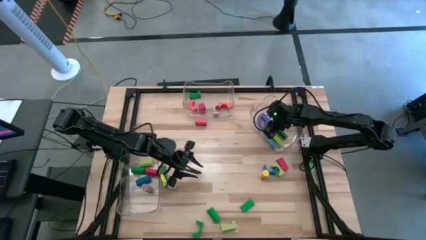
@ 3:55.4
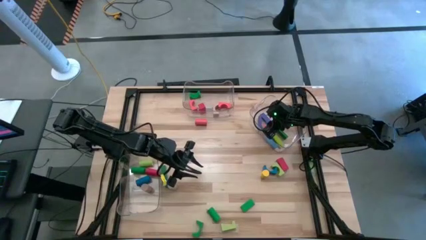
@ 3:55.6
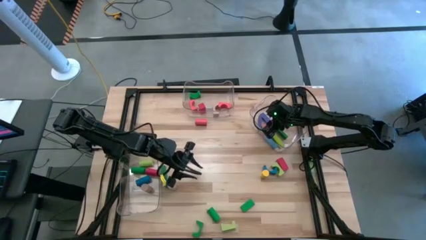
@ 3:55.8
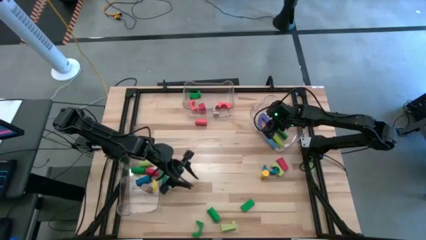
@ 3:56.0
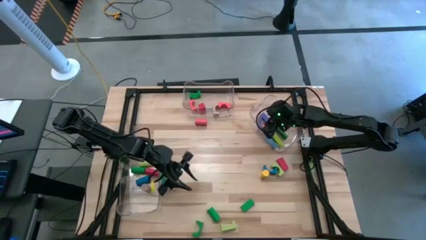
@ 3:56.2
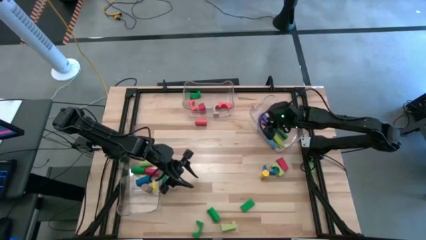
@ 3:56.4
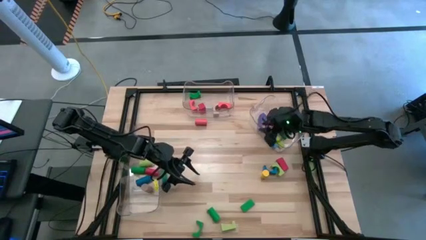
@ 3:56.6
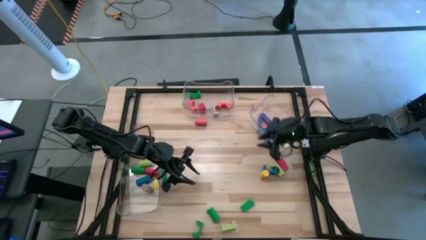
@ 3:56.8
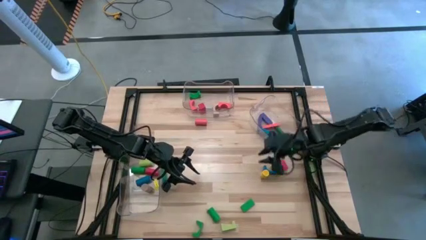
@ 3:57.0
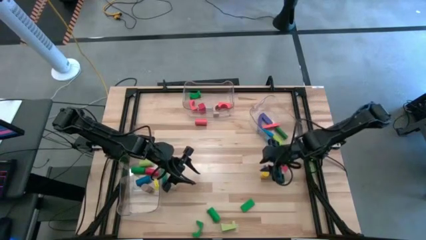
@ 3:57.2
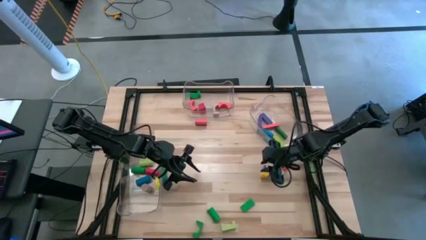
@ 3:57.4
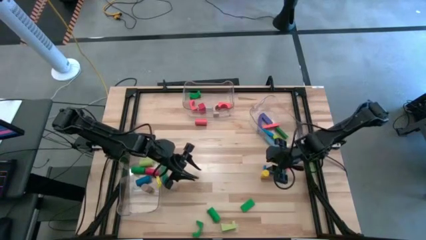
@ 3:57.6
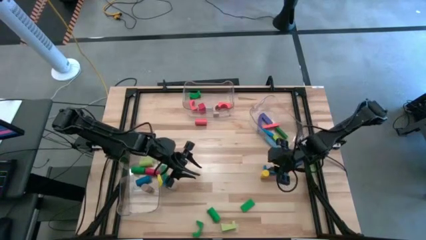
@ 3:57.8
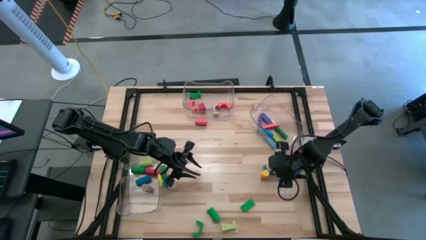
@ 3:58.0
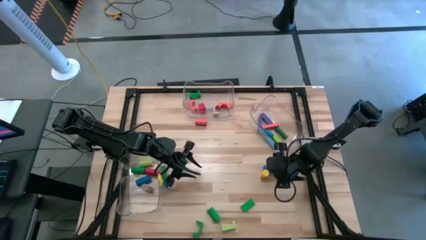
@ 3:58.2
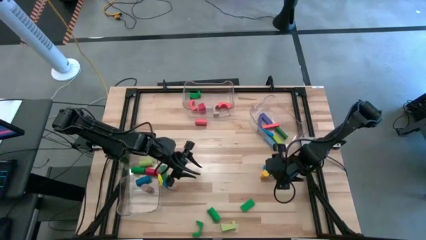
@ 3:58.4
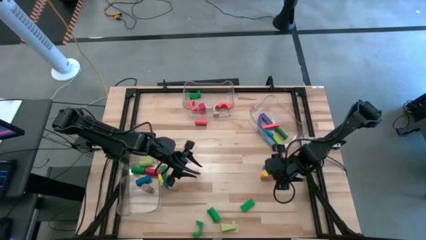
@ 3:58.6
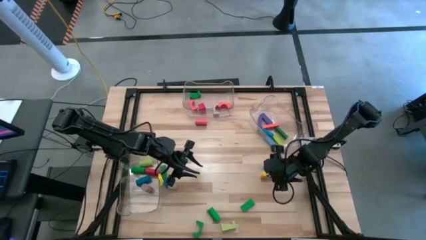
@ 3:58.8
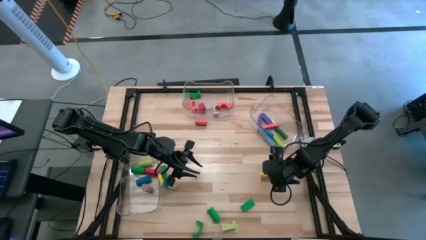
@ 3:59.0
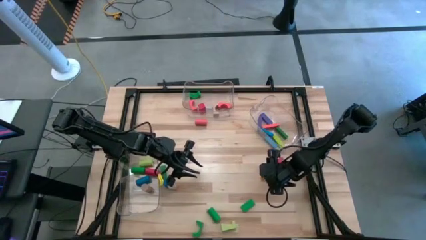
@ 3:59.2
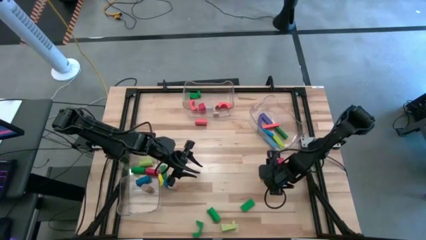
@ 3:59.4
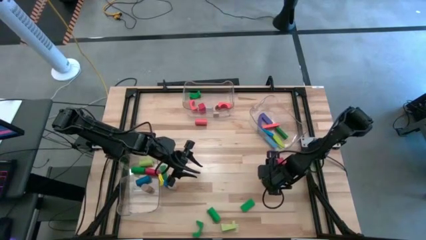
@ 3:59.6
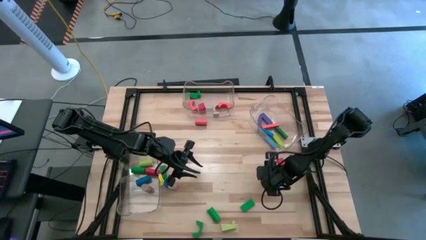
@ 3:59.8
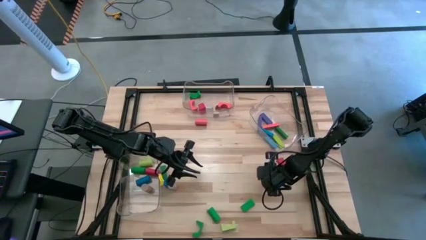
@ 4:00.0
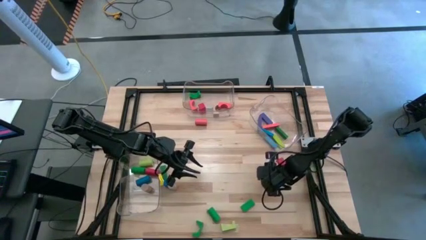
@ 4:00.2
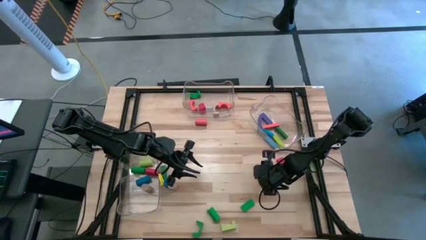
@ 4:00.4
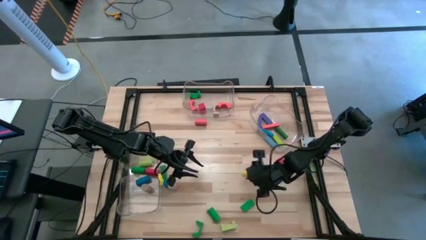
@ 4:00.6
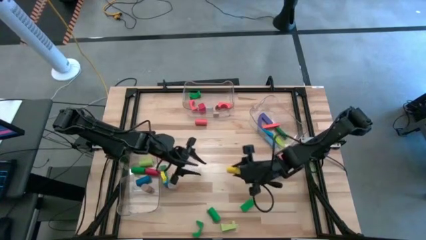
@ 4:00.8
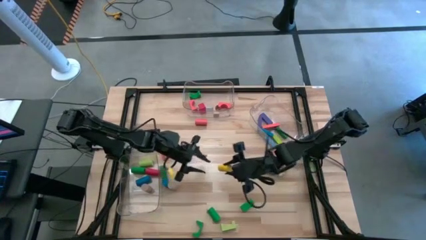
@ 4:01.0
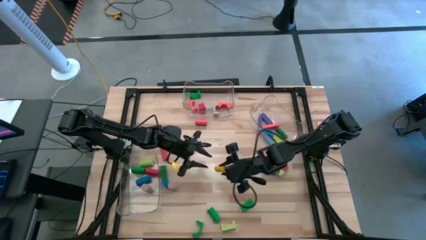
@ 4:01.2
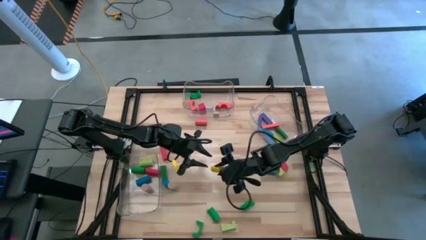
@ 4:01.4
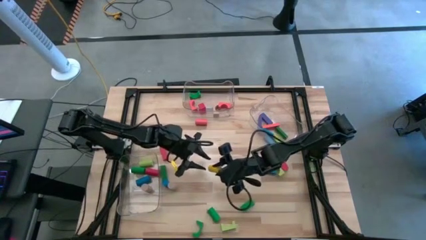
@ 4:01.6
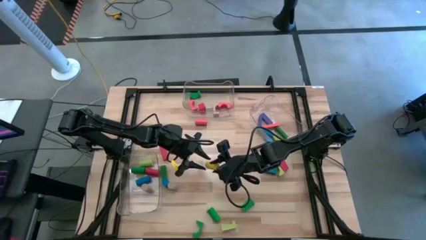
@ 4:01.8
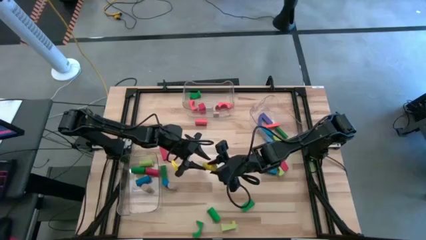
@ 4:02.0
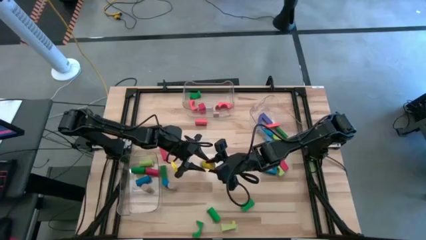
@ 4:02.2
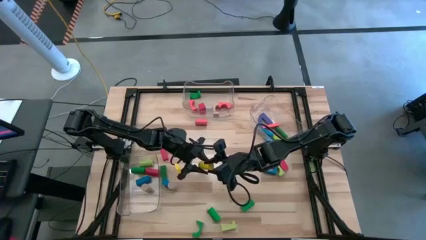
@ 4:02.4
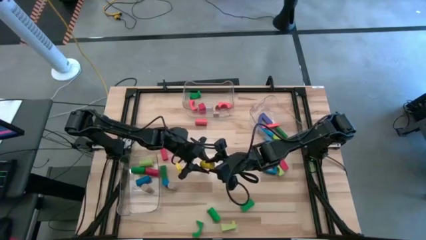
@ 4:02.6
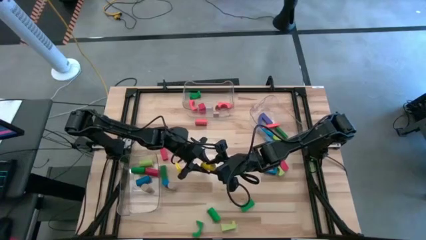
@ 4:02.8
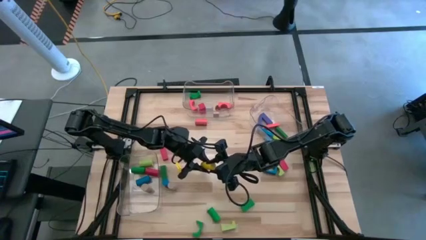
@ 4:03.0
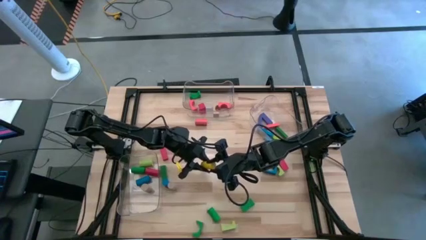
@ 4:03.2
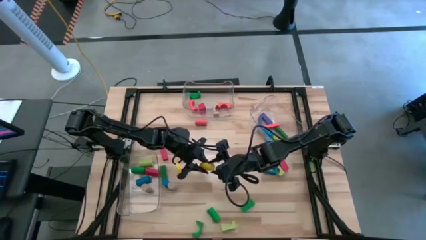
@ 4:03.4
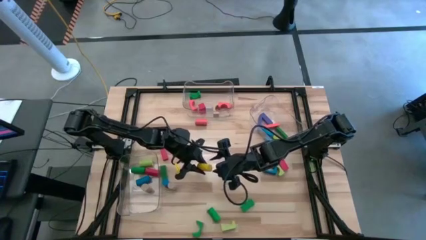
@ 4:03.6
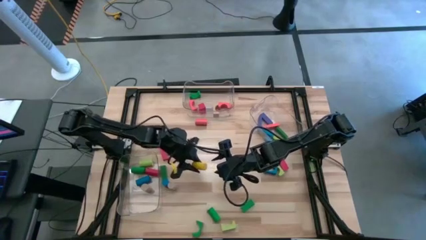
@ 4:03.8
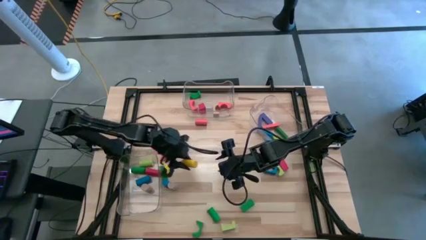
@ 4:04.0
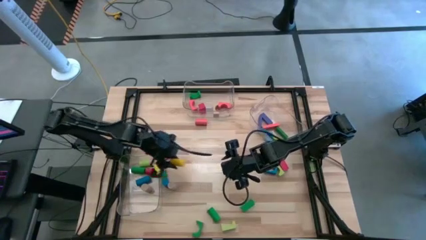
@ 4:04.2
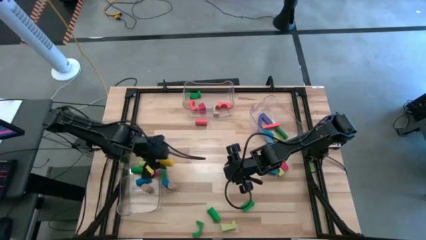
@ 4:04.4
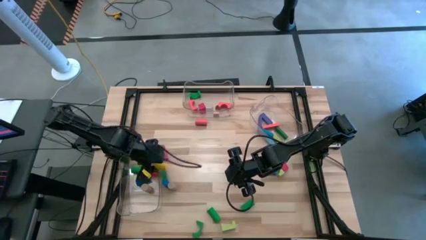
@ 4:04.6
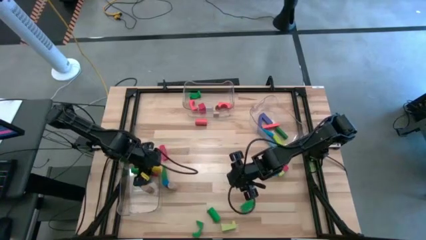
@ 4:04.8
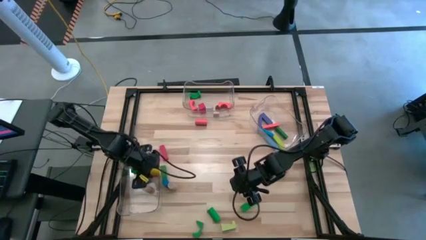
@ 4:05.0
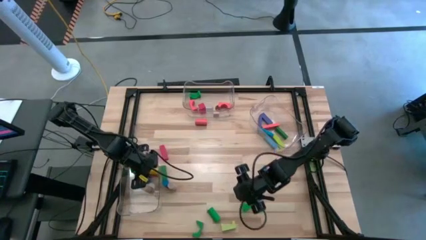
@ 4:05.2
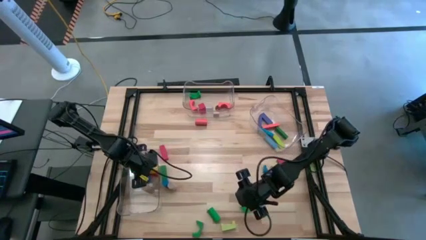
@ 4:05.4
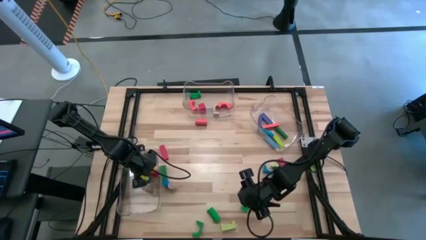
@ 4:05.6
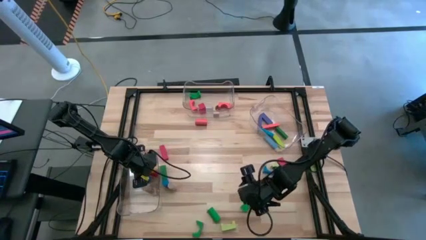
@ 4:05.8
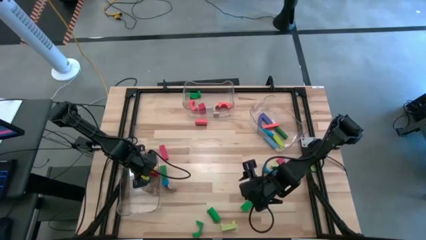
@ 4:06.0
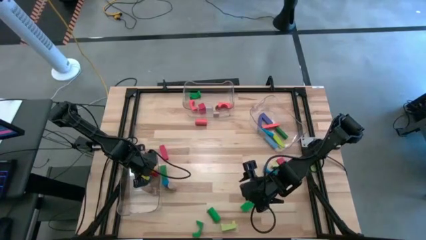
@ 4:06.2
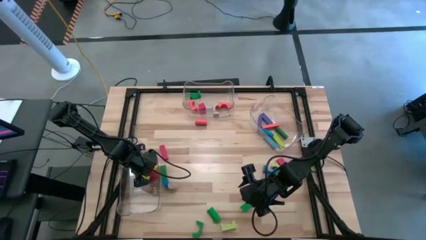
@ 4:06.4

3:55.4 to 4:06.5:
Task: Sort blocks by size
Put the yellow cylindrical block into the left transparent bin
